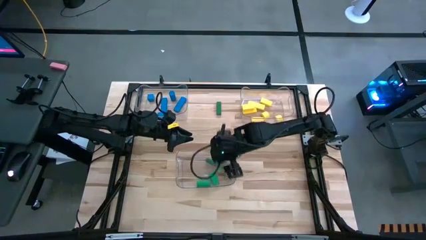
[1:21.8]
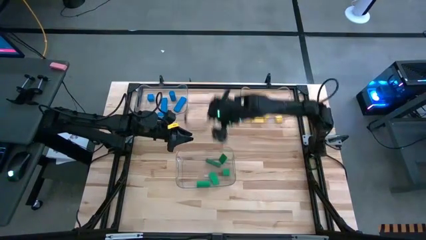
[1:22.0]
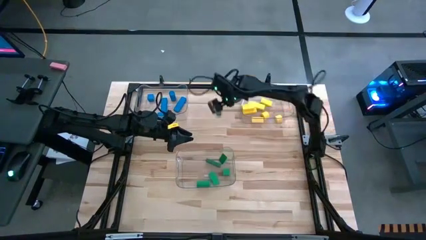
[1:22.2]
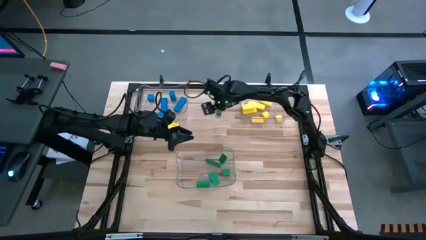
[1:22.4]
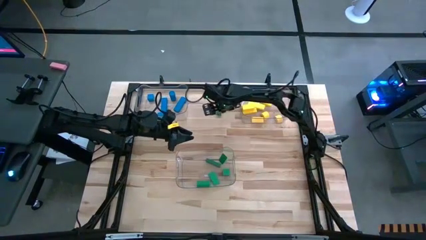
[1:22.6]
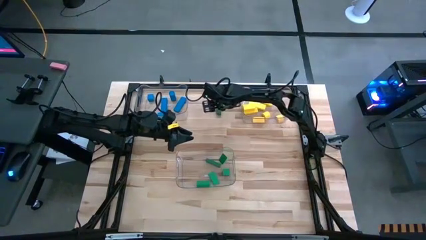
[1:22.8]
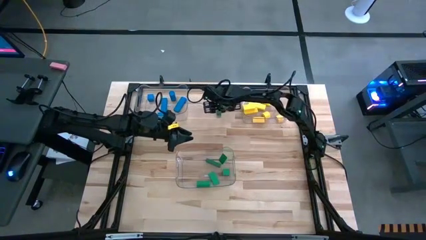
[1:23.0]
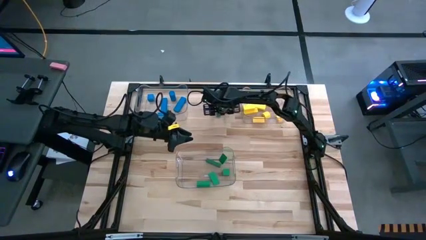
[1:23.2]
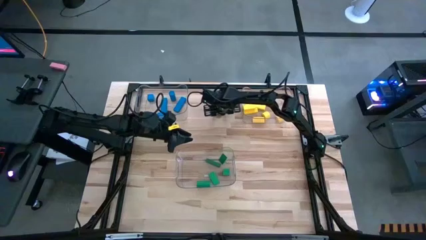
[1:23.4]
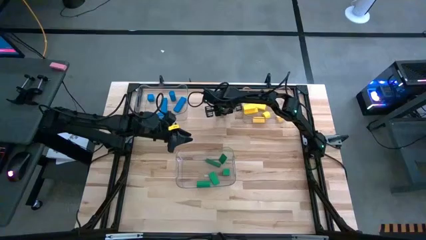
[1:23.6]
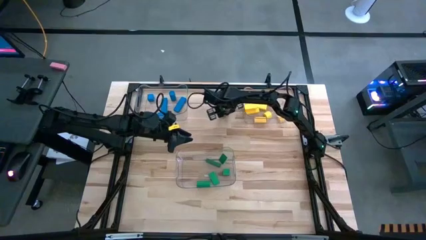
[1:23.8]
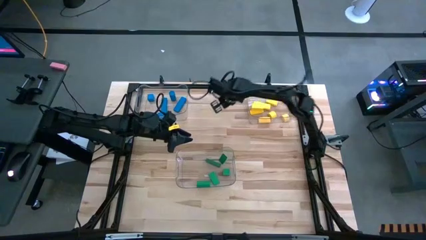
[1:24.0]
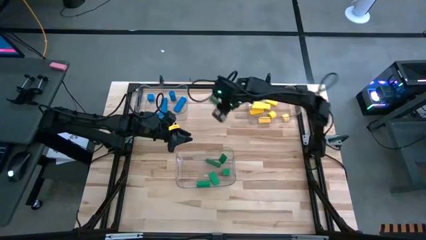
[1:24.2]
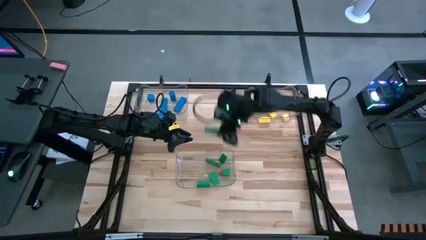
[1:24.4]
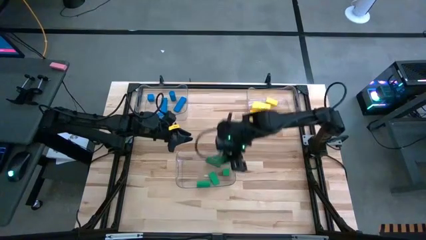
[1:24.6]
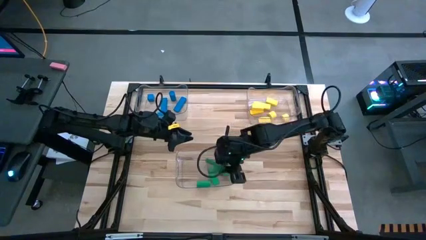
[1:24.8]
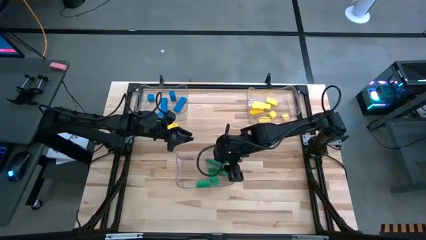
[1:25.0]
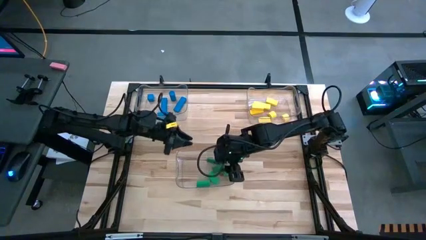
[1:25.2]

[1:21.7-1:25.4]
Task: Sort blocks
Put the green block into the bottom transparent bin

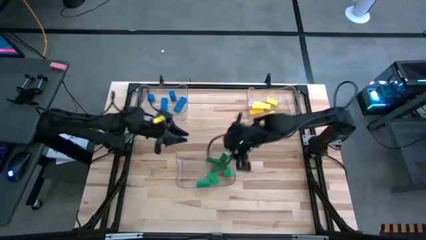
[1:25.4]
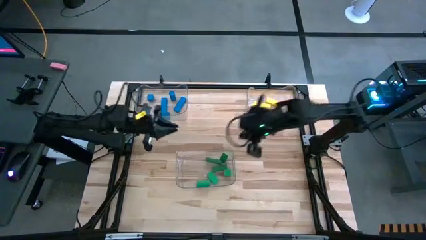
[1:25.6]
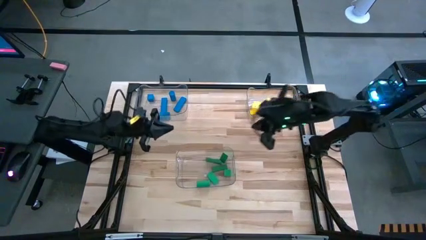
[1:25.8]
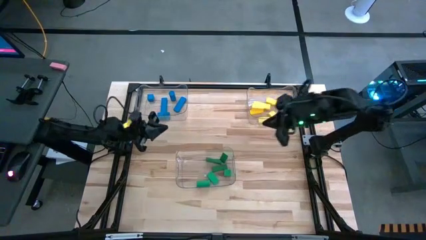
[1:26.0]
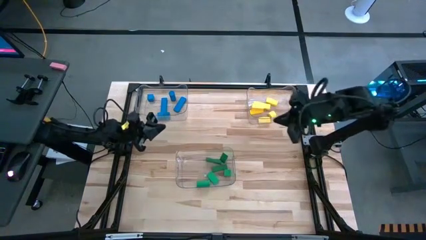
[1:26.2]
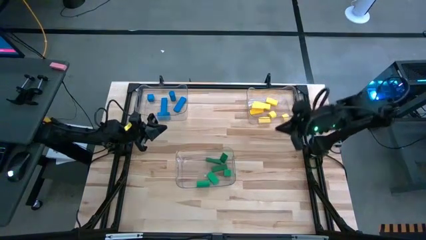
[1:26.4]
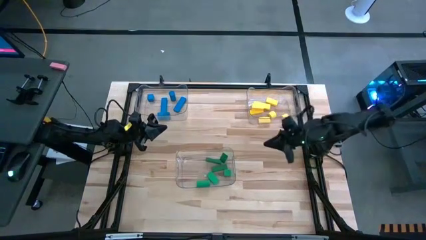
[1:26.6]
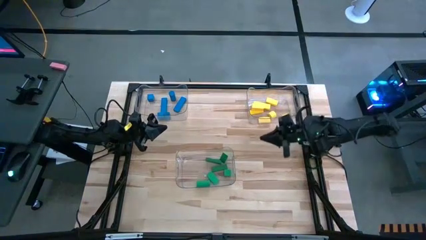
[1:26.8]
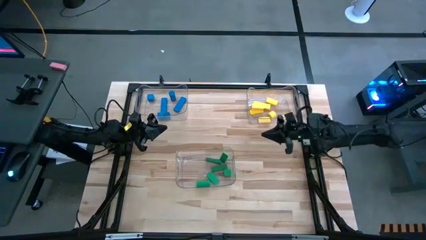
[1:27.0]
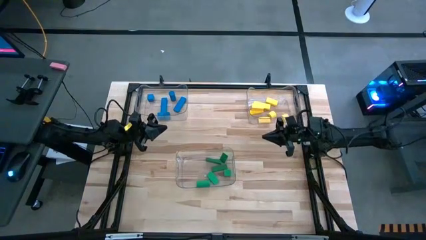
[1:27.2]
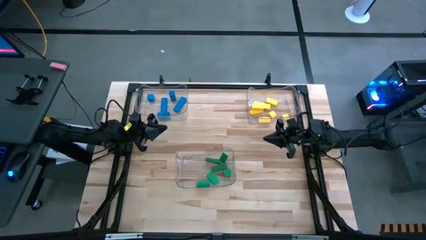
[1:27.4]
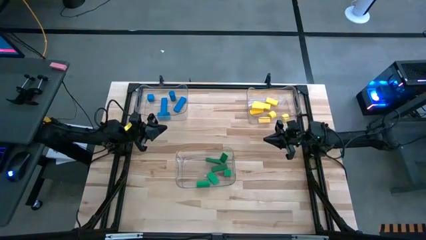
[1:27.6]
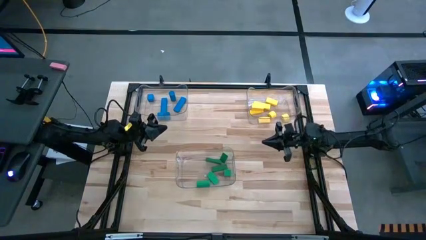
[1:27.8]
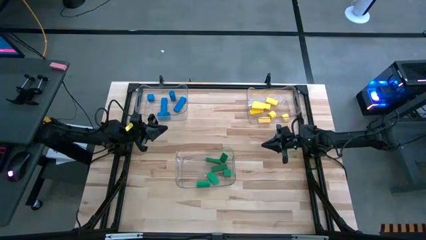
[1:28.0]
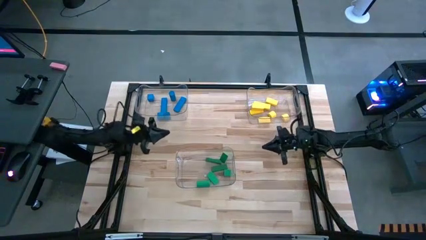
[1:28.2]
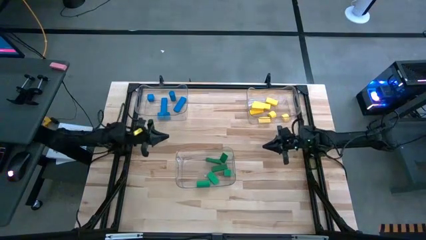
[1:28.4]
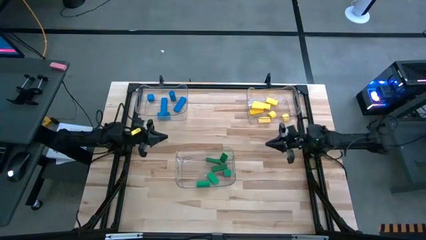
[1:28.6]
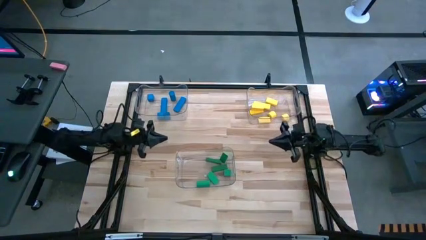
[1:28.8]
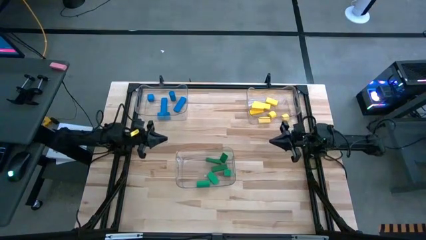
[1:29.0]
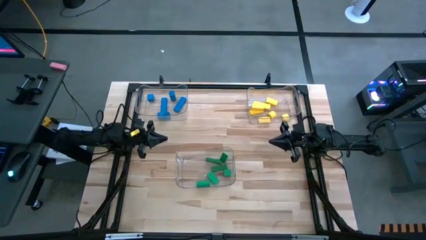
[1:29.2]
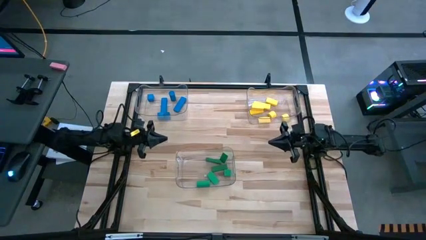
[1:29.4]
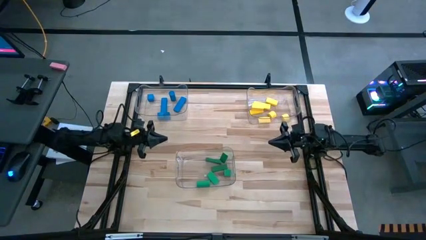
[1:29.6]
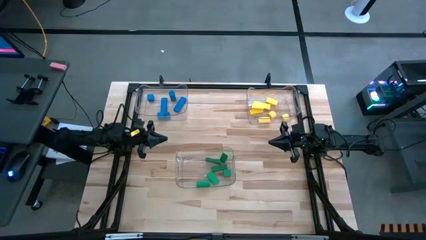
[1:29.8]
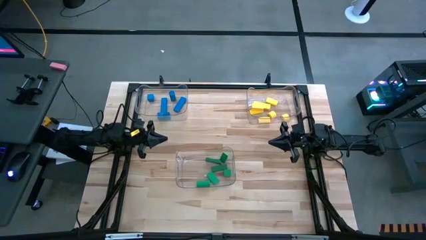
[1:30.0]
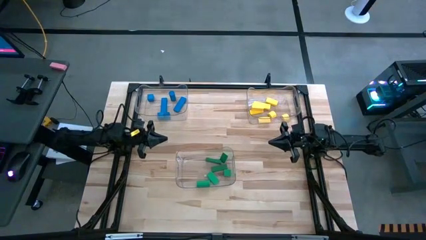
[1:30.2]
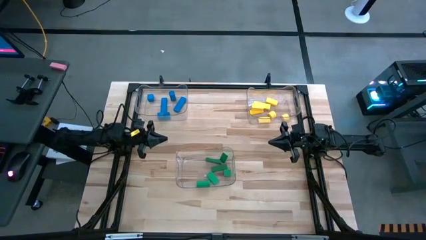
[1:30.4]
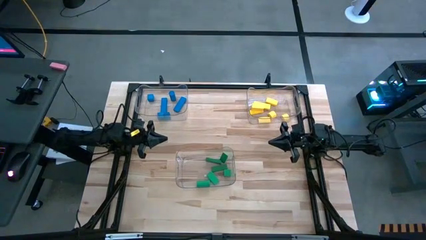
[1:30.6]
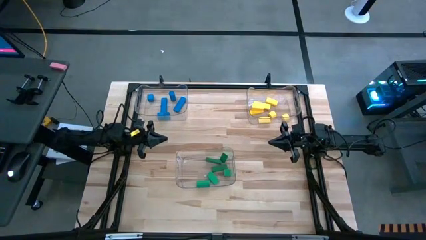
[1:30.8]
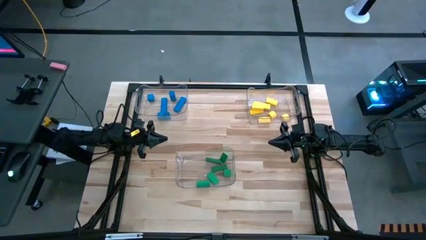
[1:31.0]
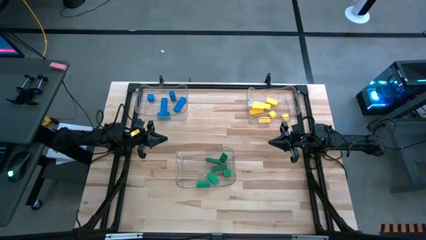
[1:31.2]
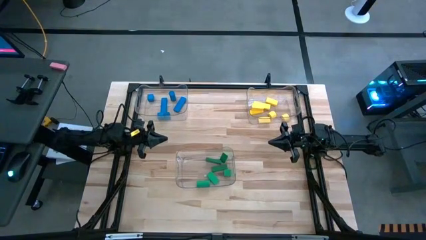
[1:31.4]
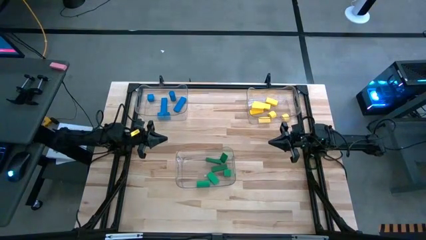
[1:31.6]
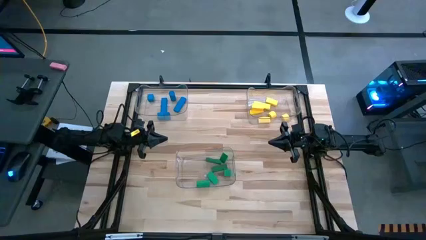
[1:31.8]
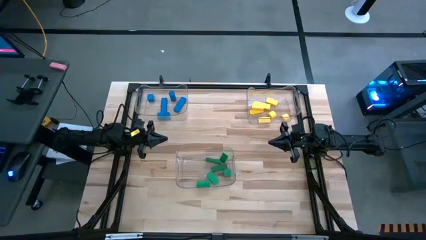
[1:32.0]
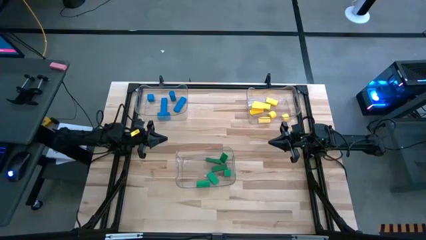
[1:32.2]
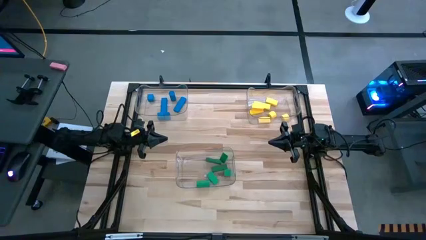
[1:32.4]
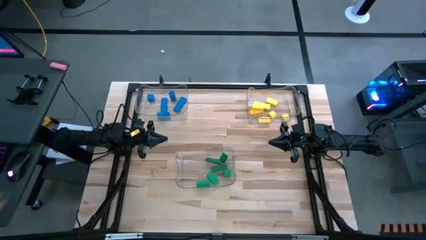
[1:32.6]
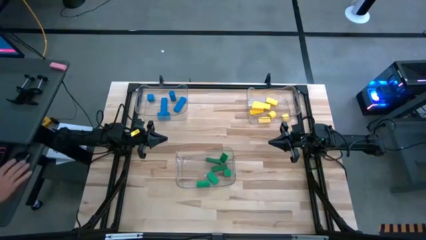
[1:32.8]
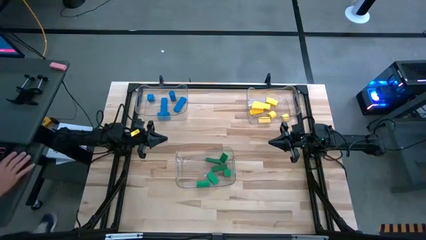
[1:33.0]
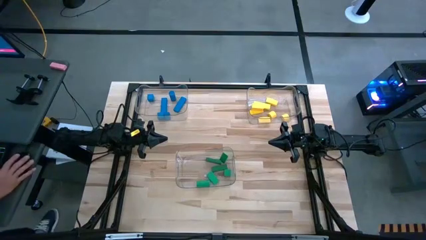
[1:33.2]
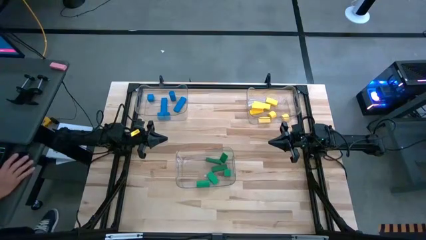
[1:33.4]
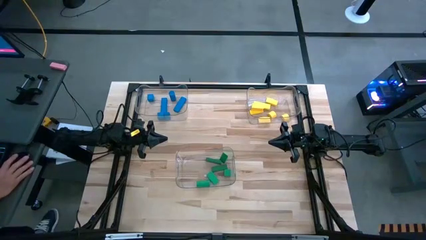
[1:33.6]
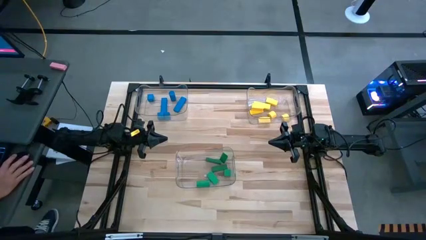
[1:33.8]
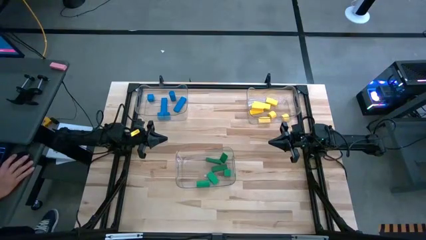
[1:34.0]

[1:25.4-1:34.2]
Return to Home Position

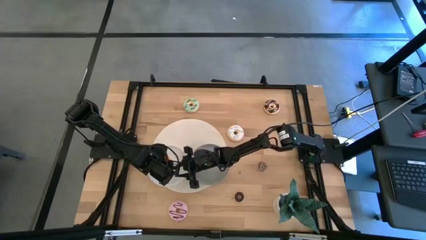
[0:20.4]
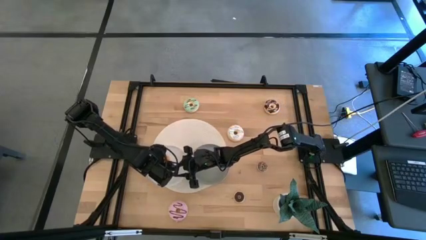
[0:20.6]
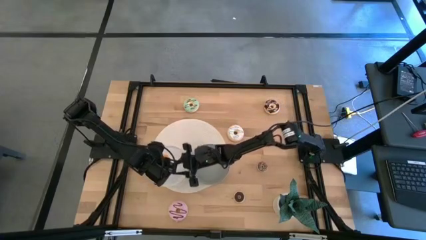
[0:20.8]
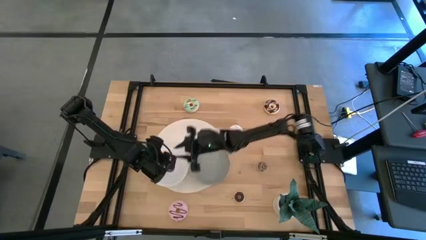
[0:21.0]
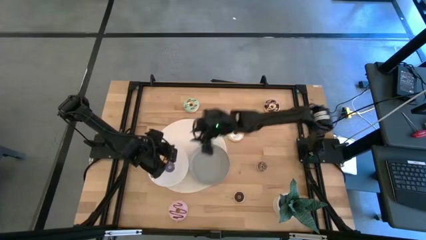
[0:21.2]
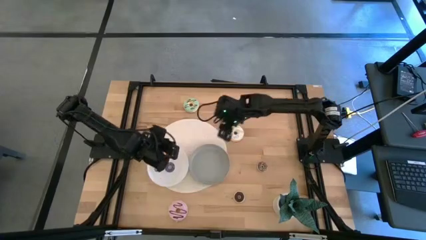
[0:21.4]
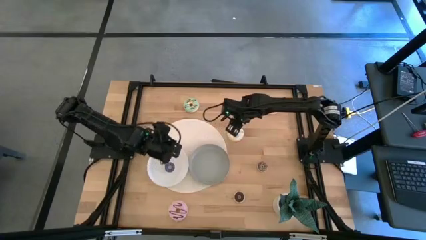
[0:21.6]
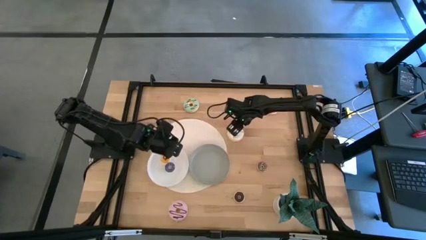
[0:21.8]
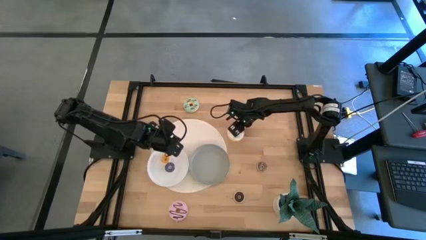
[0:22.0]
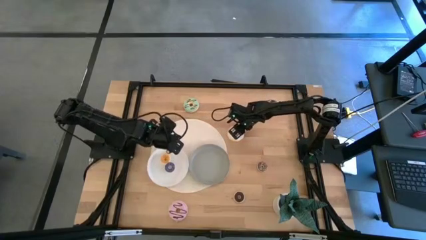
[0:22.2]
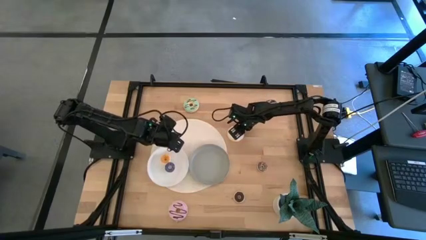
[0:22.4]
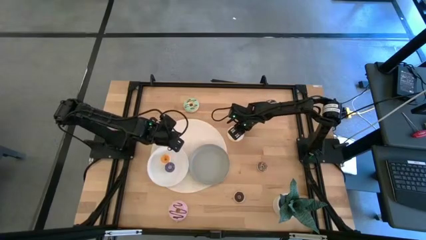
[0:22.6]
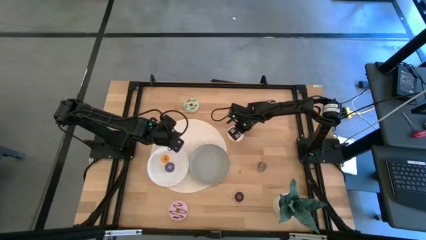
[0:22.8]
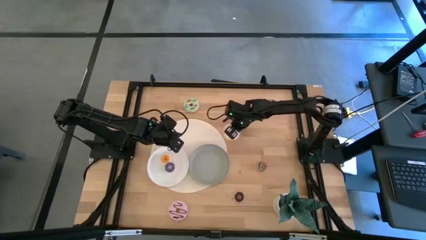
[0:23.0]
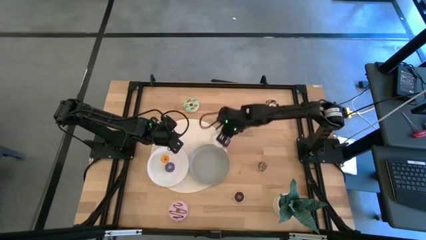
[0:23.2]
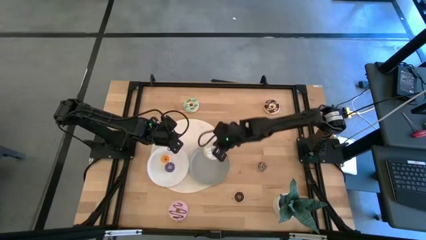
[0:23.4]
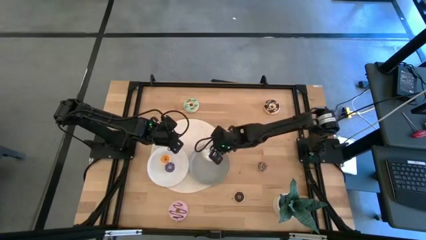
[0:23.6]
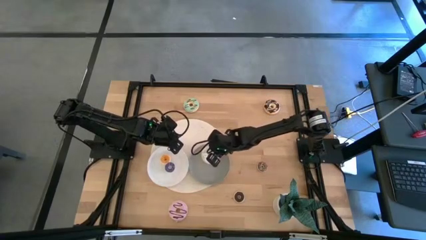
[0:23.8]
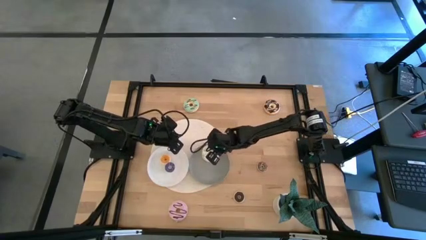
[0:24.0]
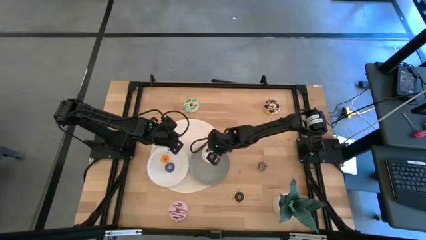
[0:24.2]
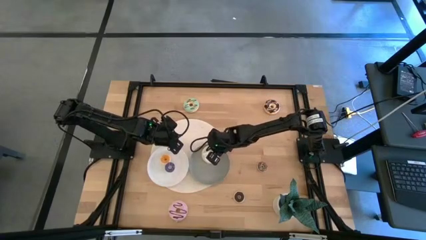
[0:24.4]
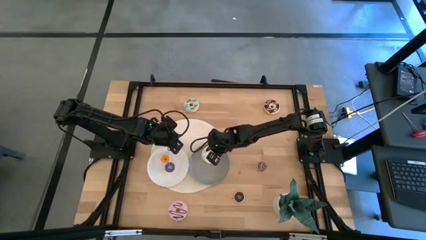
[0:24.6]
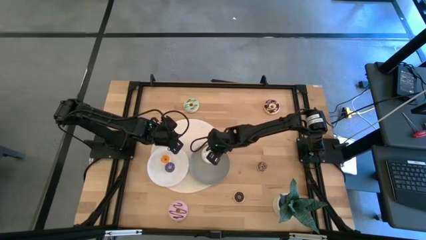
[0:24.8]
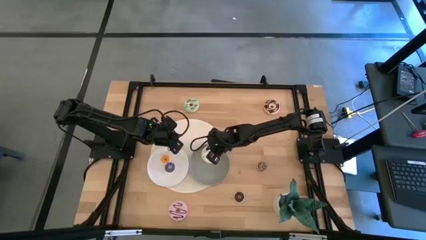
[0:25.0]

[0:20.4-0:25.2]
Task: Pick & Place donuts
Put the big white donuts on the gray plate
